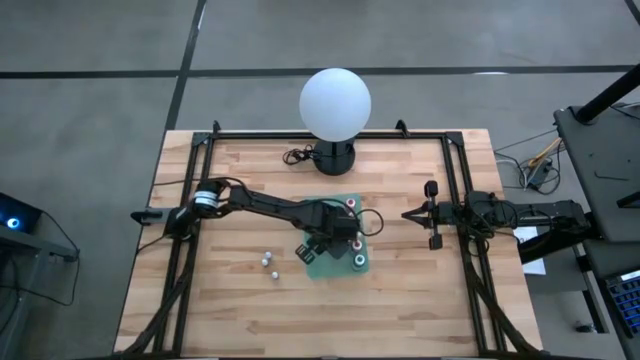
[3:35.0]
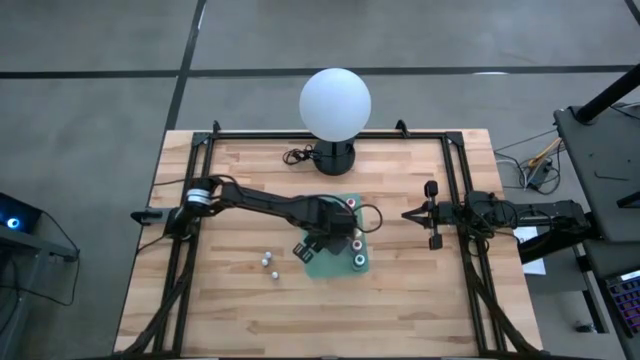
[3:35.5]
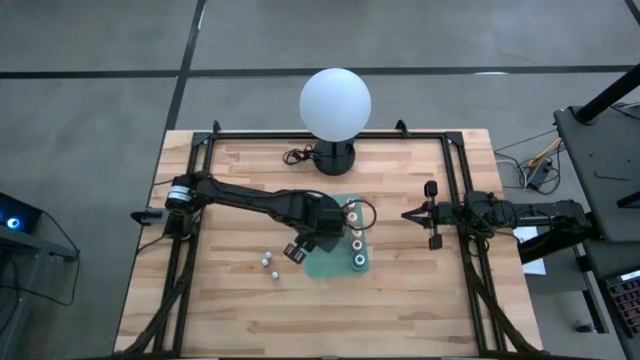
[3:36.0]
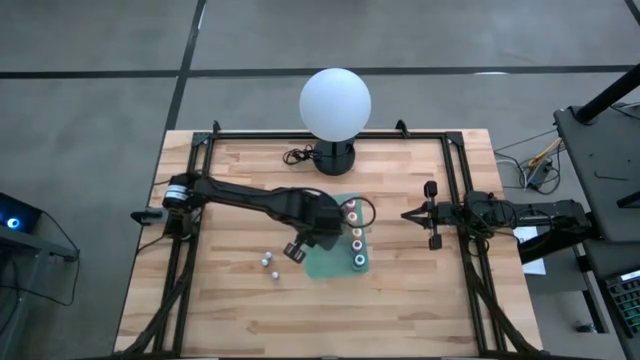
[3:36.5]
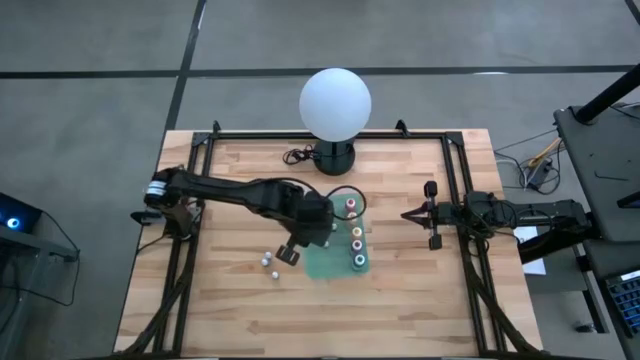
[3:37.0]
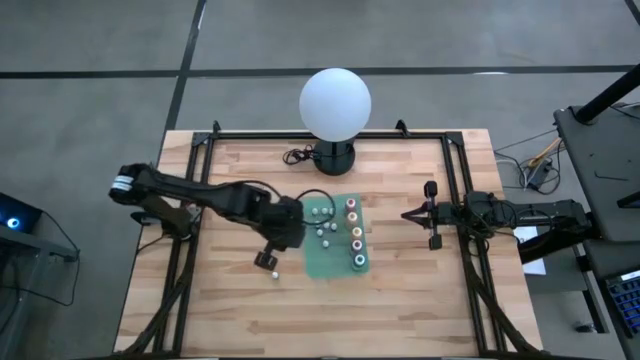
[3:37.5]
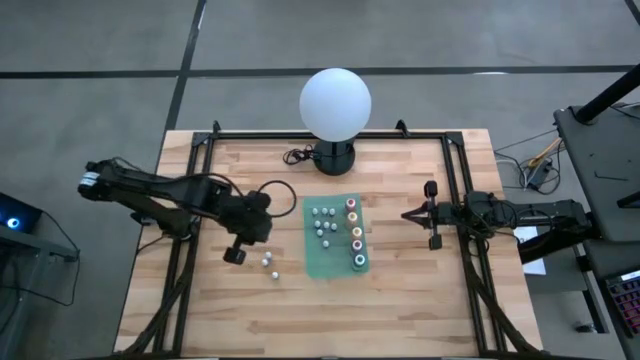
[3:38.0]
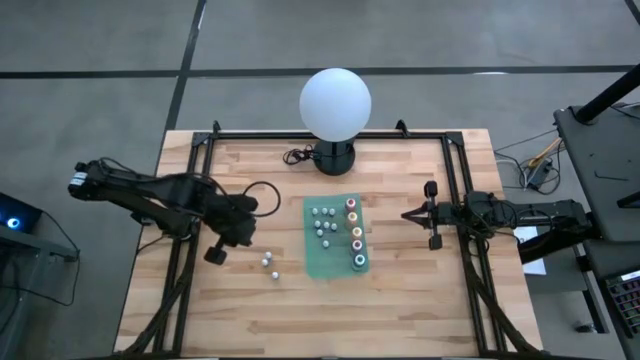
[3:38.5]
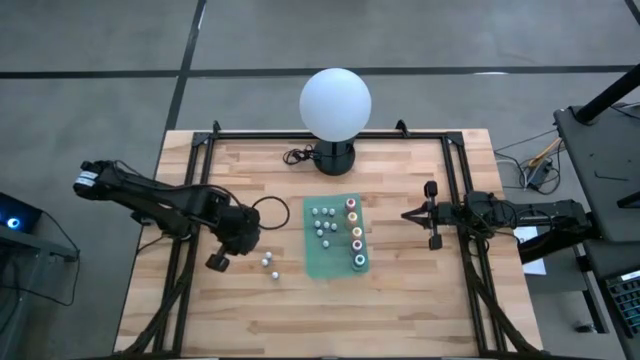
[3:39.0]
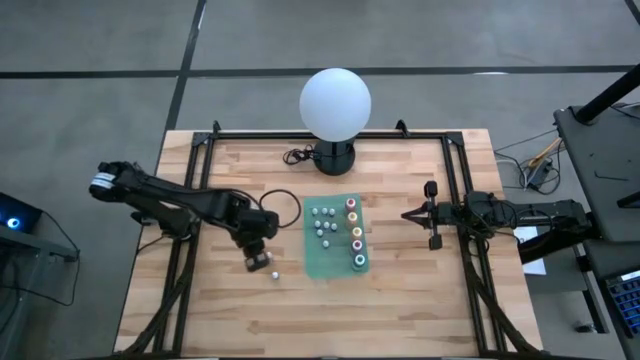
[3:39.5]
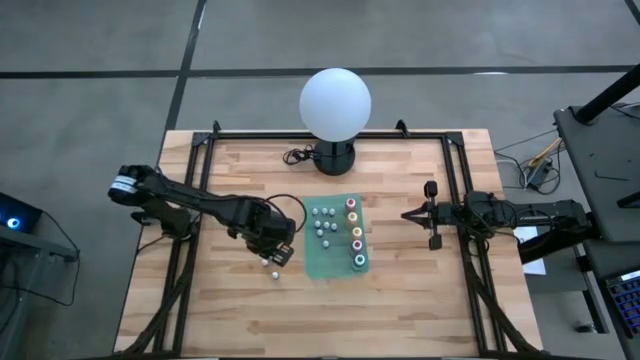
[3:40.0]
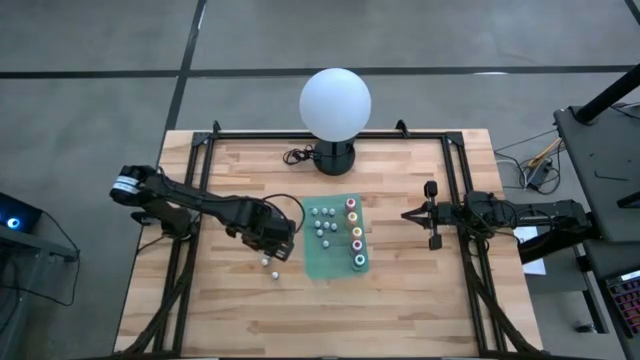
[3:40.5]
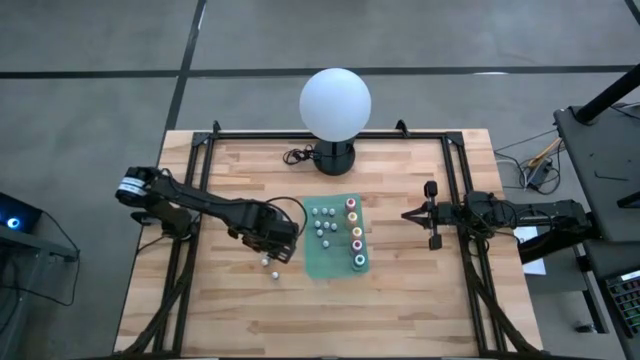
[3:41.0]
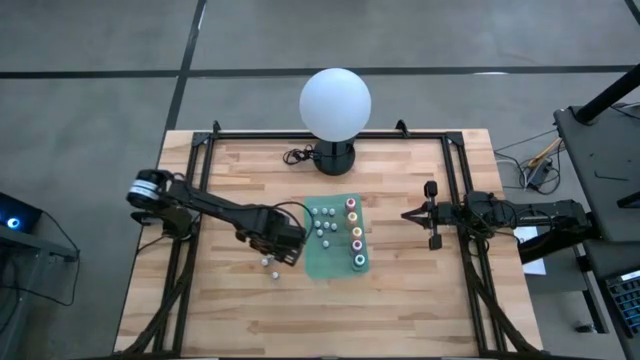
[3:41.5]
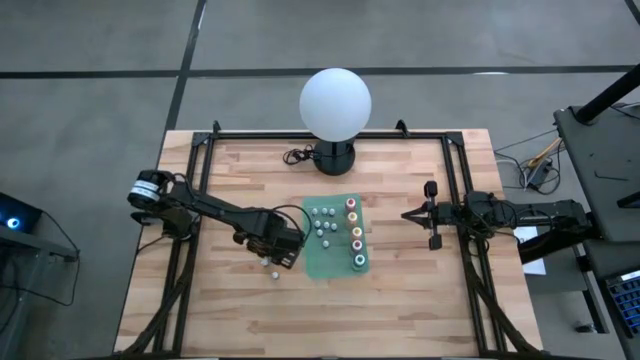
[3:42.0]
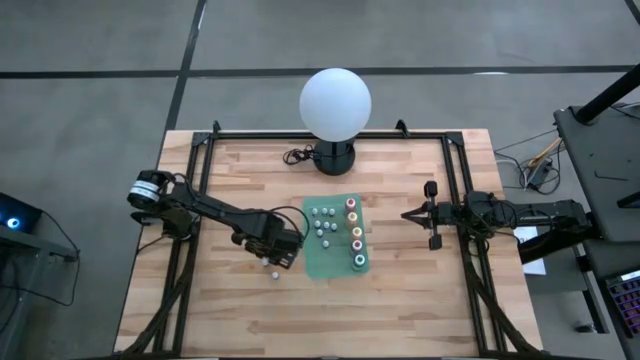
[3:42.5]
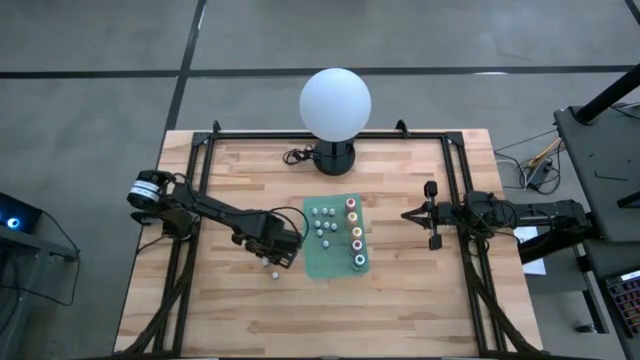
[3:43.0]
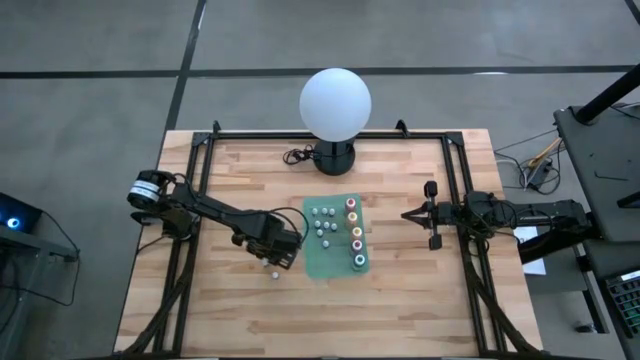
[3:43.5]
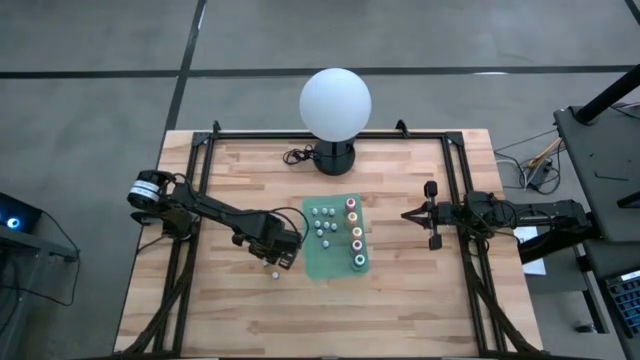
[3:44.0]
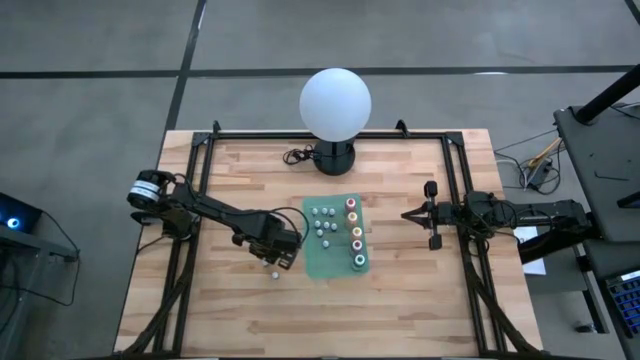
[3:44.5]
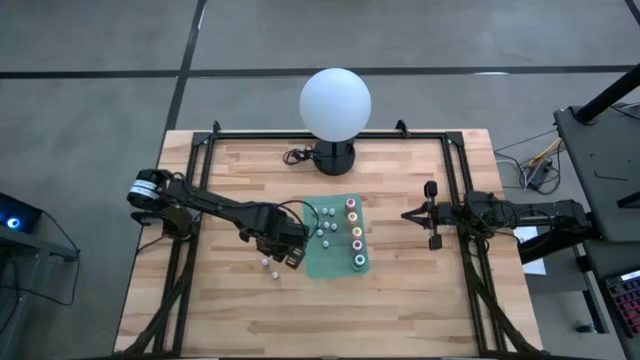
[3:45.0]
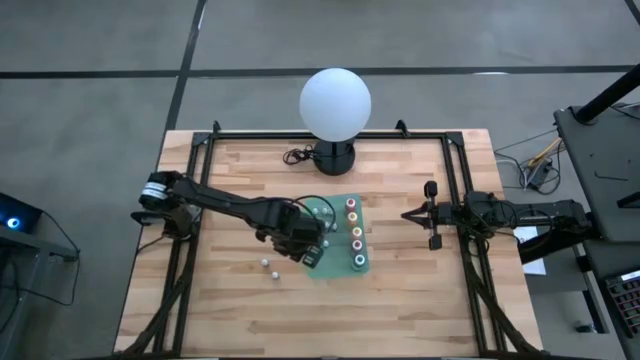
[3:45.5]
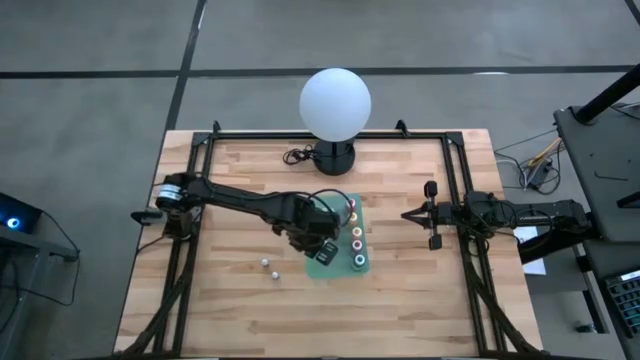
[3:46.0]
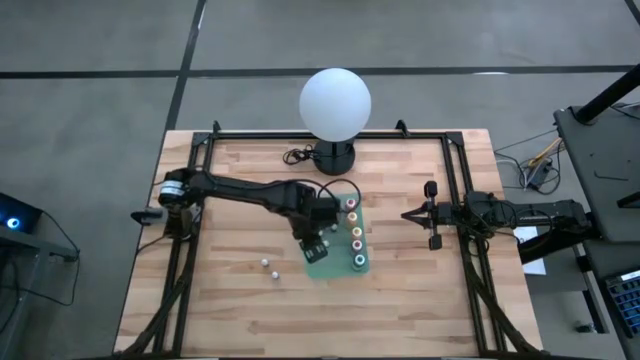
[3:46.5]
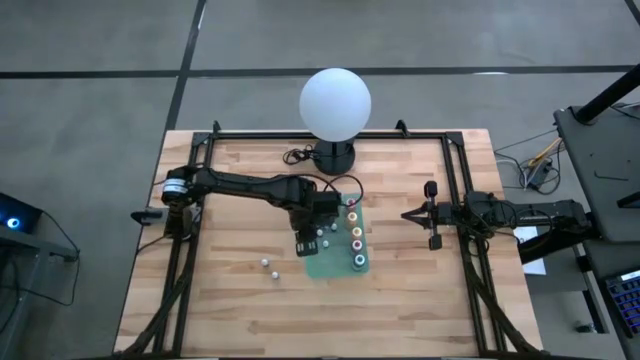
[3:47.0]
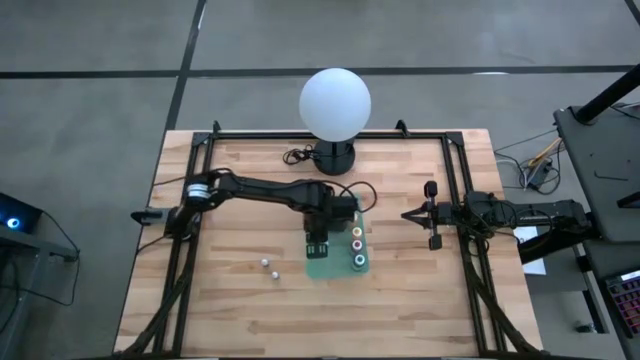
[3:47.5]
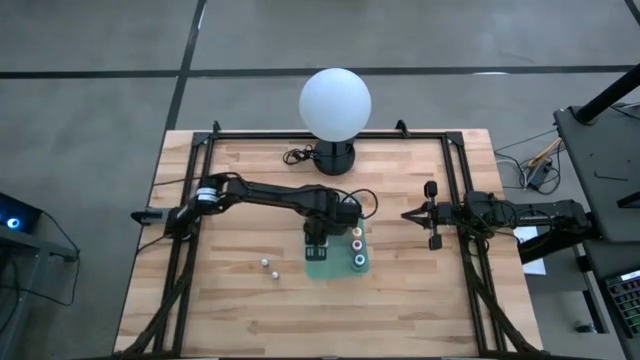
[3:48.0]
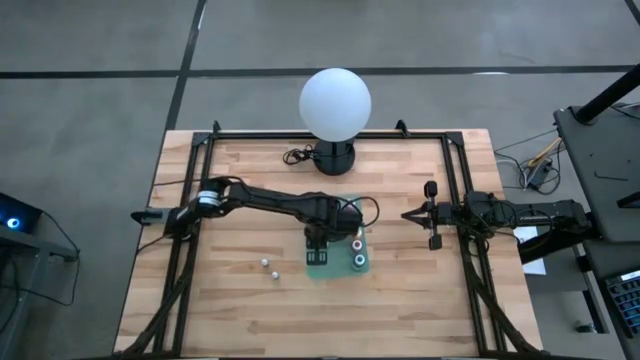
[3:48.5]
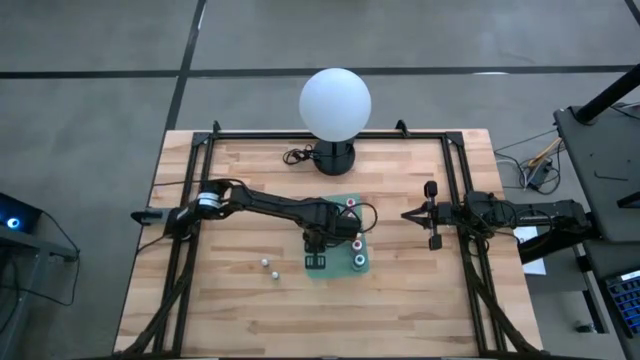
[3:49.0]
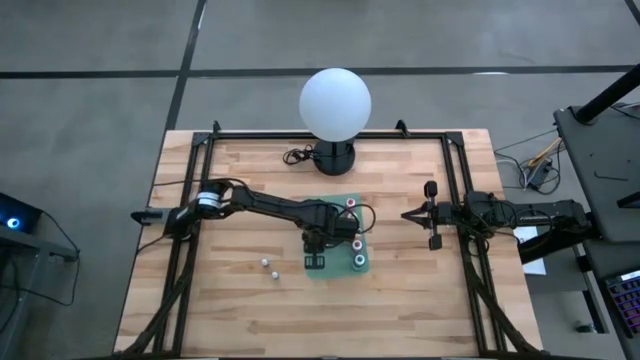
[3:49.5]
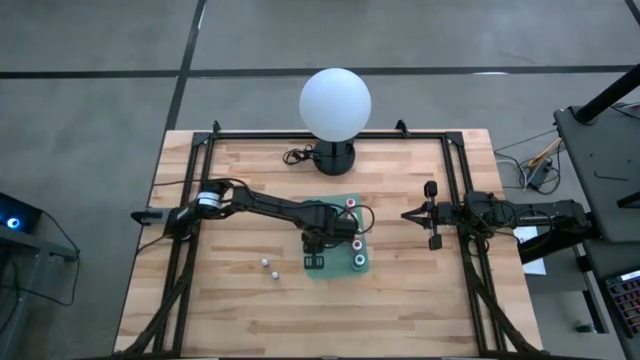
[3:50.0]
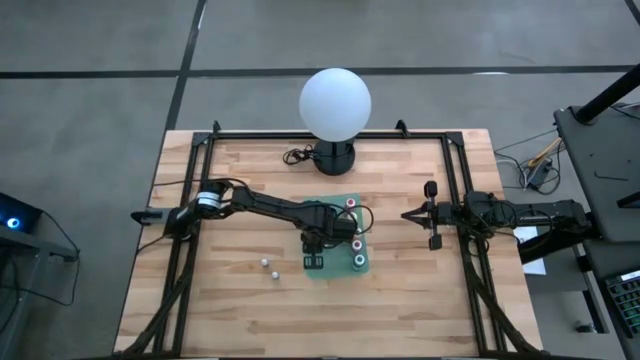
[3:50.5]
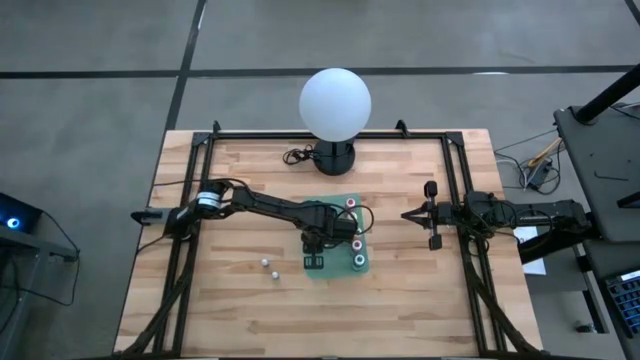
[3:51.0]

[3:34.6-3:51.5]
Task: Pick & Place food coloring
Put the small blue food coloring bottle into the green bin

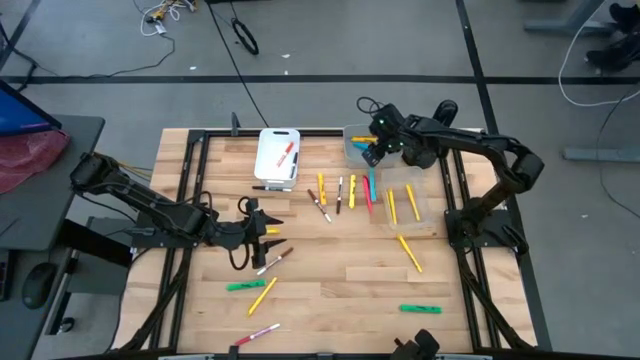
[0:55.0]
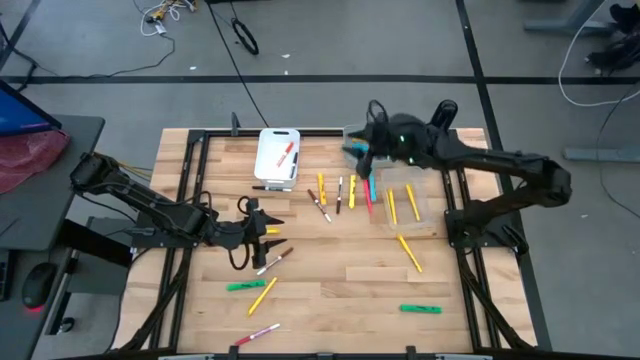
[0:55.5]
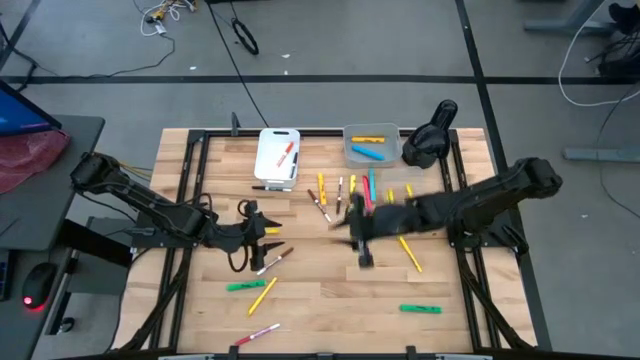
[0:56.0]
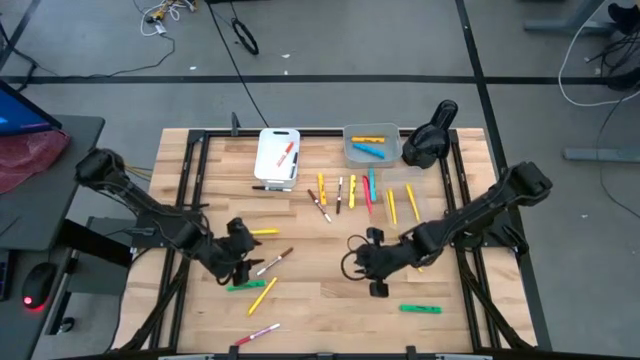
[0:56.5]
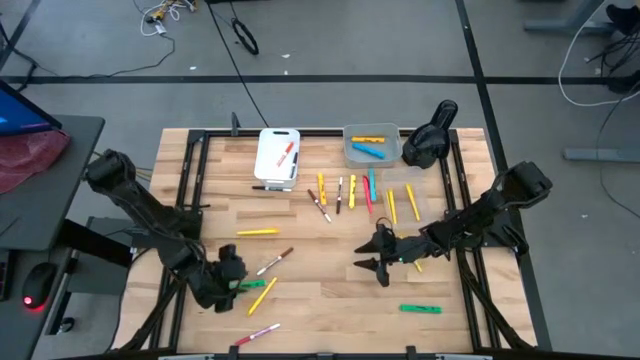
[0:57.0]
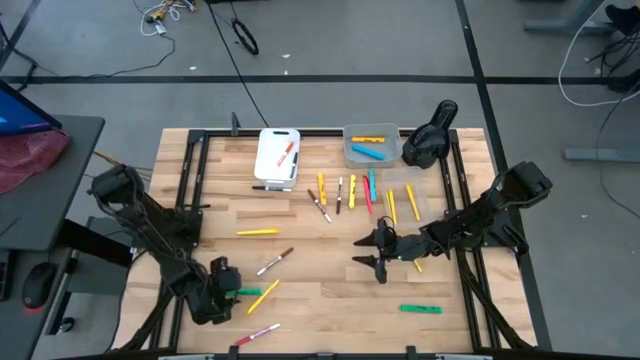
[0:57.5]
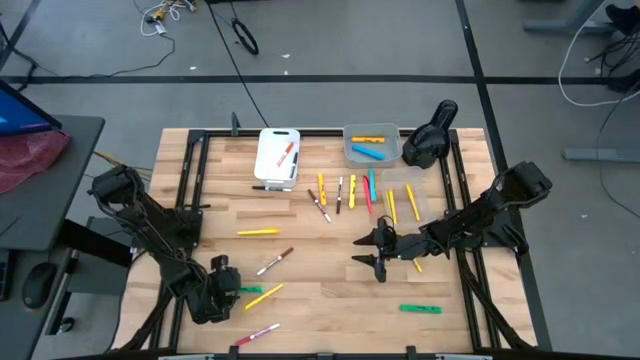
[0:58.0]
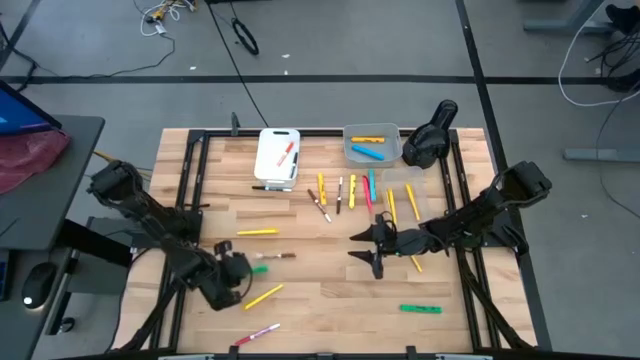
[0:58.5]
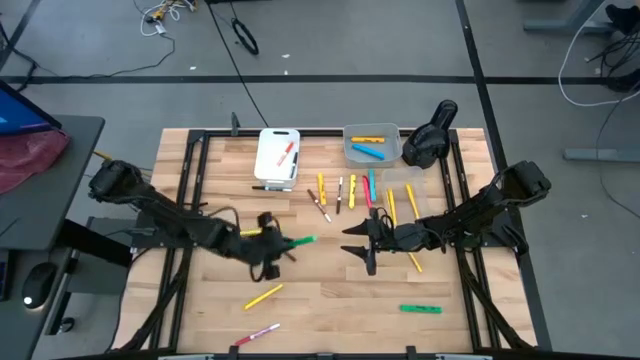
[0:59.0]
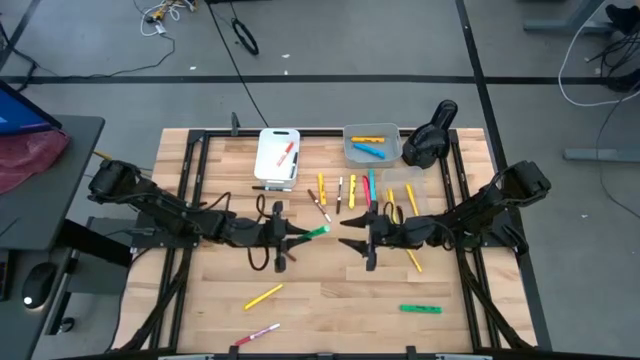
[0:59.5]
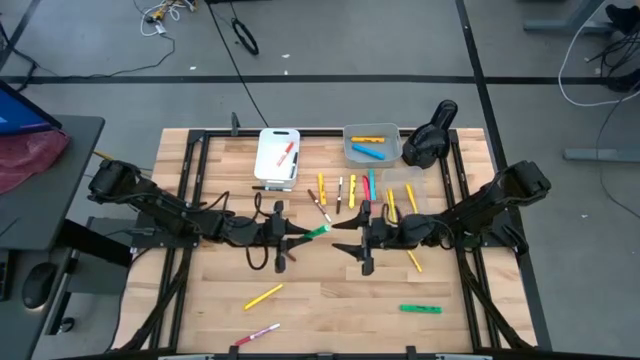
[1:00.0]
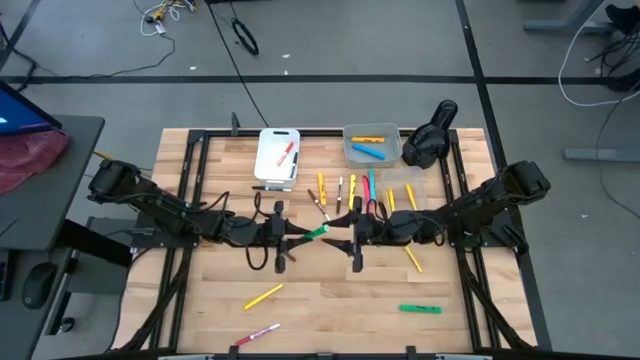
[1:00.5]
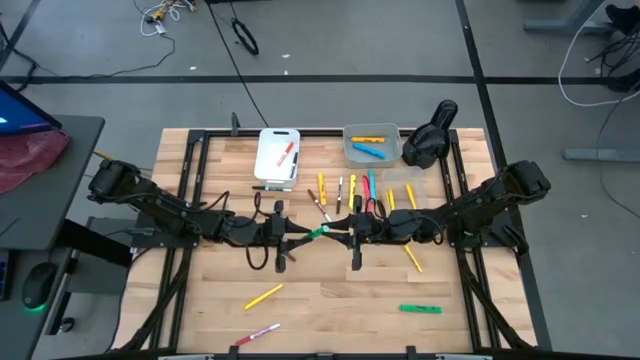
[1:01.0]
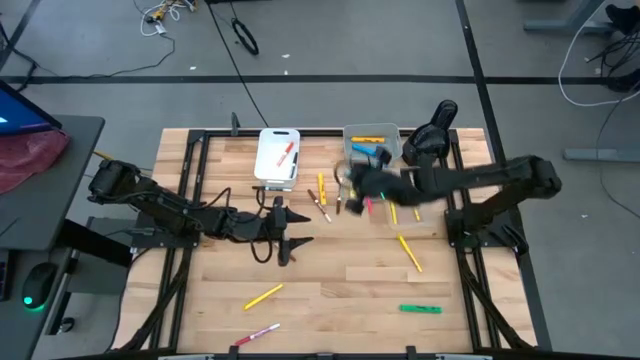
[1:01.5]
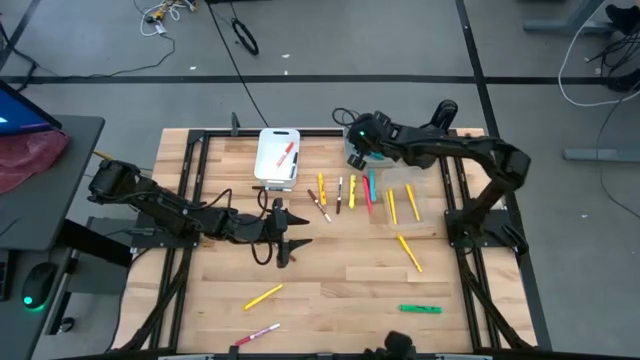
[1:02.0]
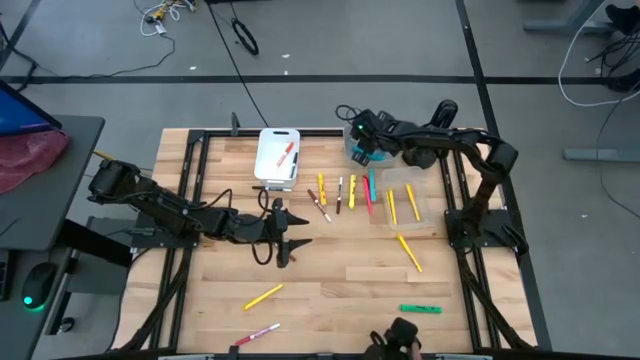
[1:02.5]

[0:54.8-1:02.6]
Task: Pick & Place Markers
Put the green highlighter pen into the gray bin
